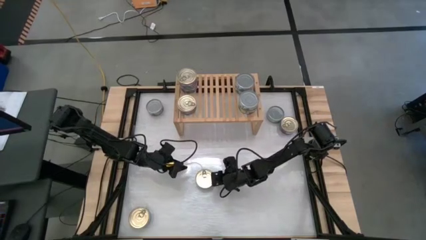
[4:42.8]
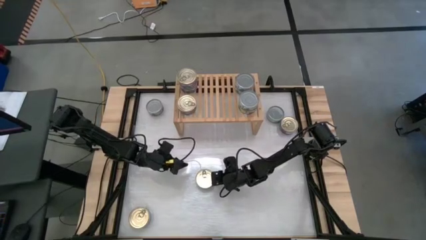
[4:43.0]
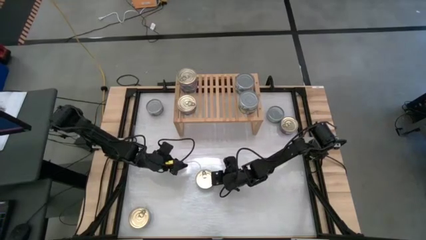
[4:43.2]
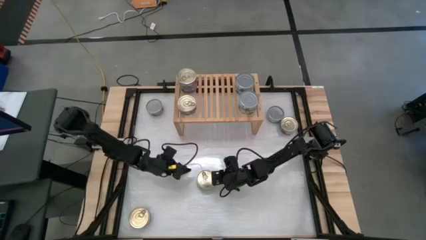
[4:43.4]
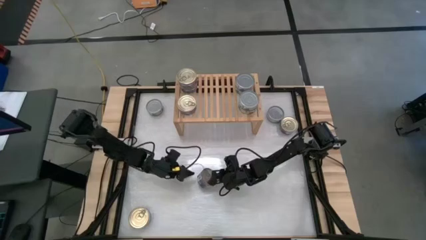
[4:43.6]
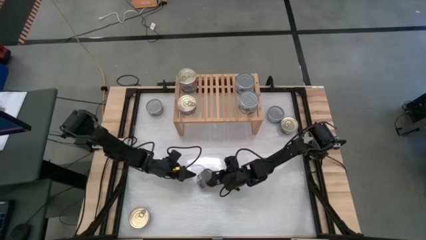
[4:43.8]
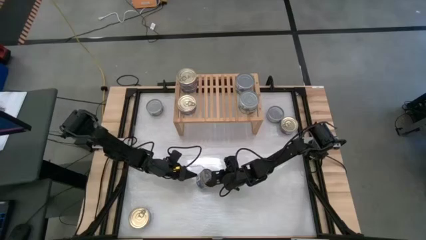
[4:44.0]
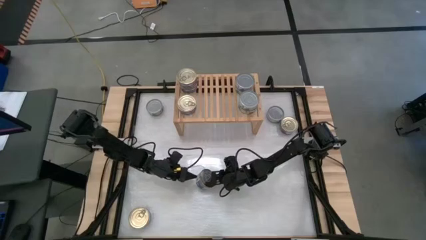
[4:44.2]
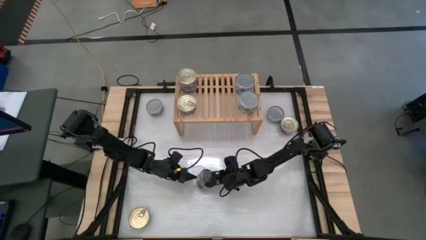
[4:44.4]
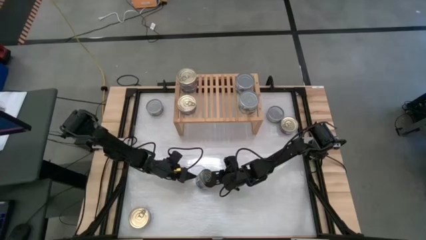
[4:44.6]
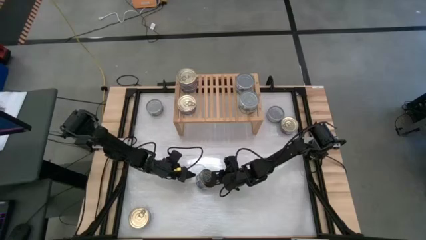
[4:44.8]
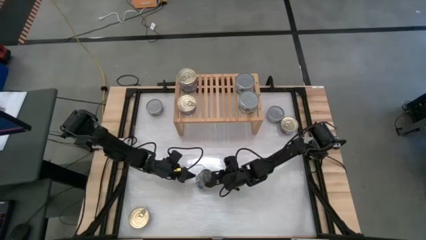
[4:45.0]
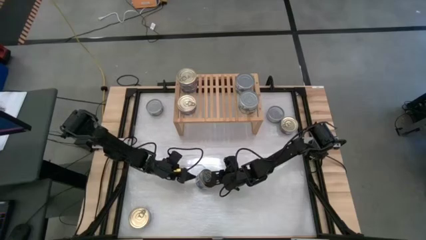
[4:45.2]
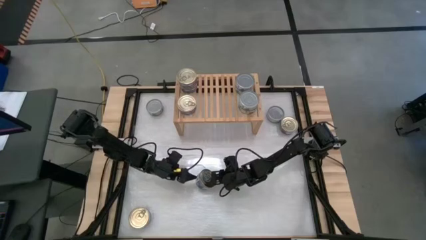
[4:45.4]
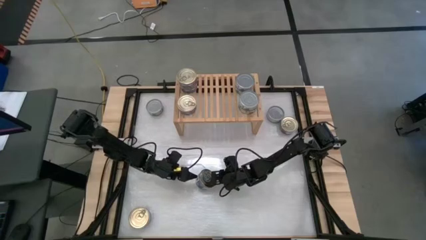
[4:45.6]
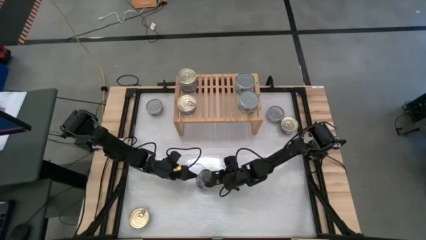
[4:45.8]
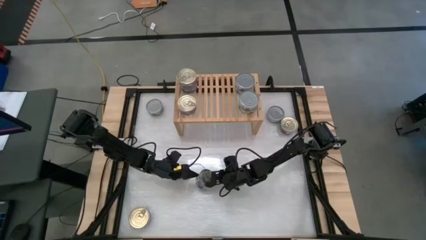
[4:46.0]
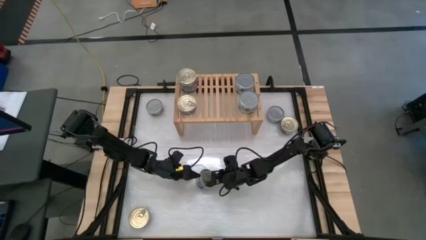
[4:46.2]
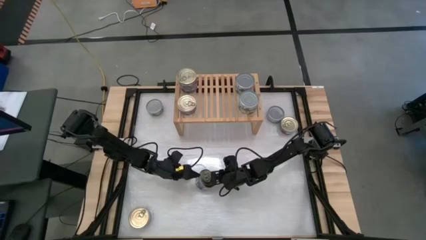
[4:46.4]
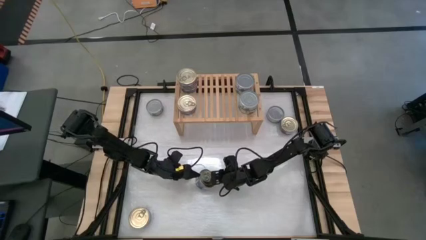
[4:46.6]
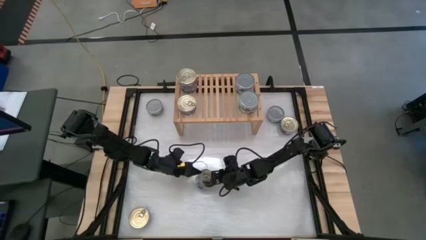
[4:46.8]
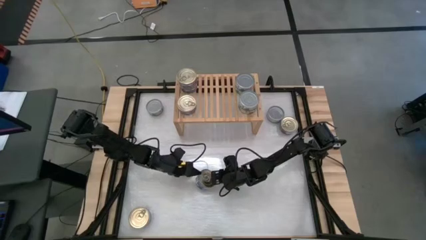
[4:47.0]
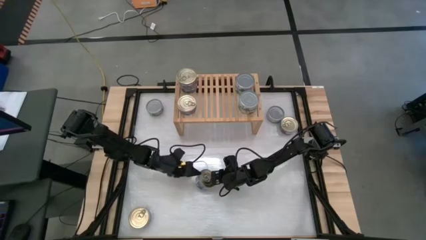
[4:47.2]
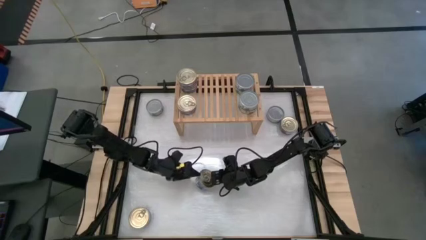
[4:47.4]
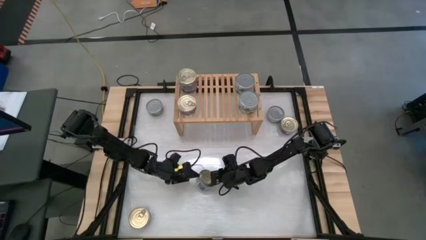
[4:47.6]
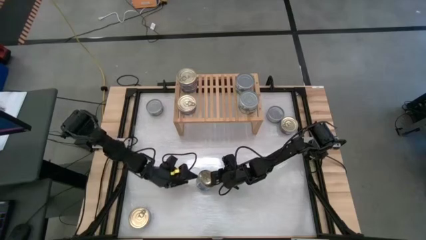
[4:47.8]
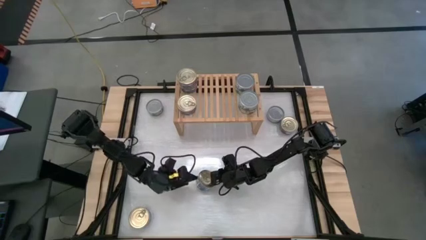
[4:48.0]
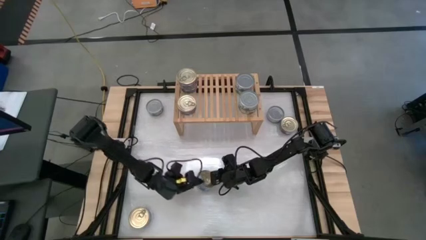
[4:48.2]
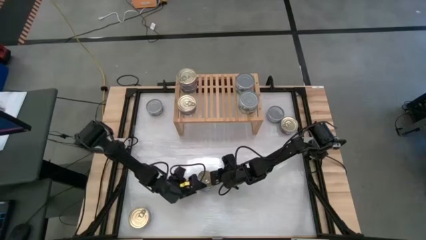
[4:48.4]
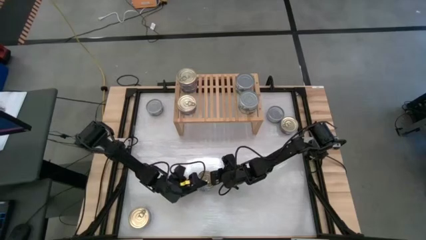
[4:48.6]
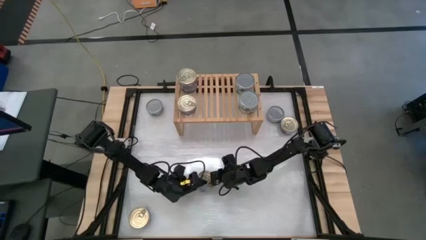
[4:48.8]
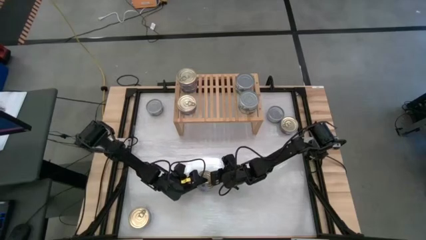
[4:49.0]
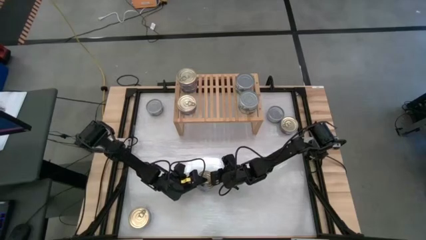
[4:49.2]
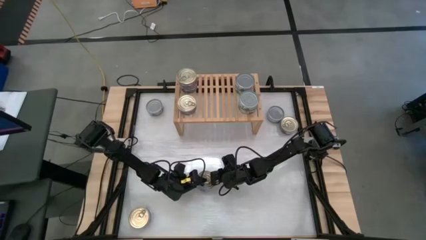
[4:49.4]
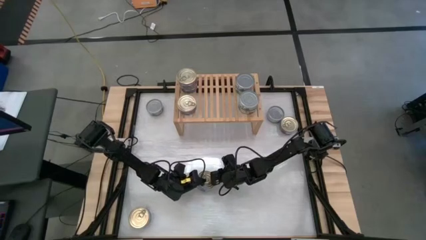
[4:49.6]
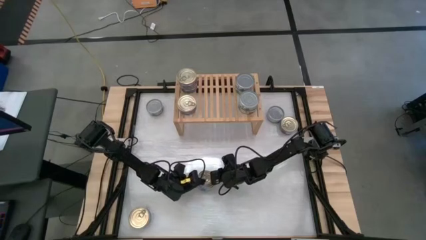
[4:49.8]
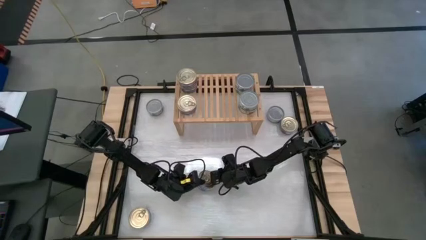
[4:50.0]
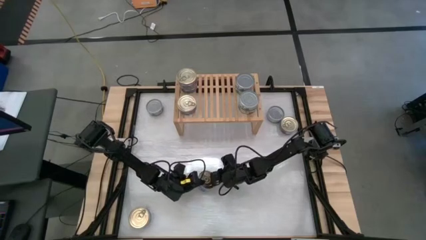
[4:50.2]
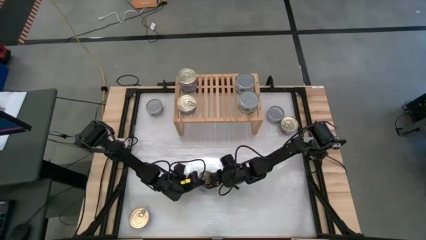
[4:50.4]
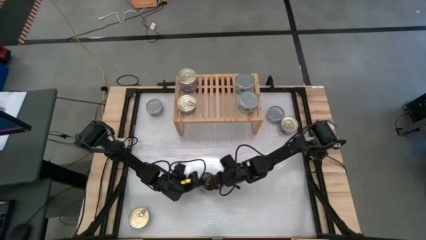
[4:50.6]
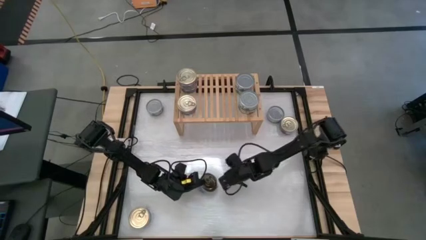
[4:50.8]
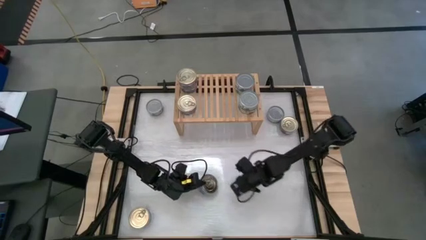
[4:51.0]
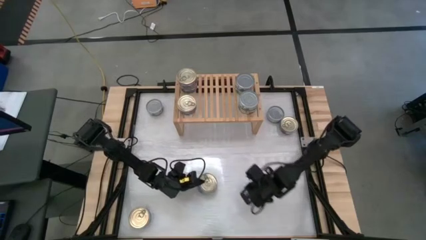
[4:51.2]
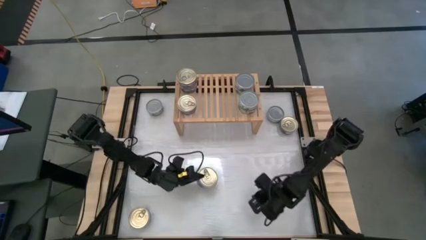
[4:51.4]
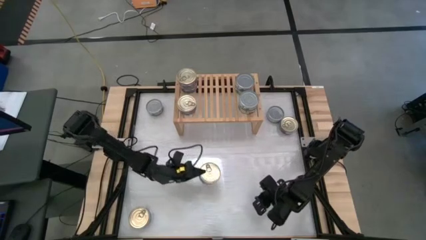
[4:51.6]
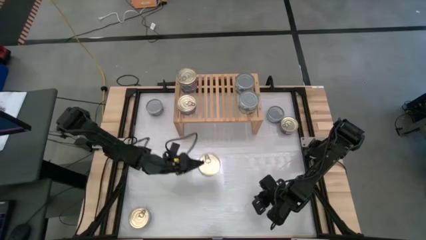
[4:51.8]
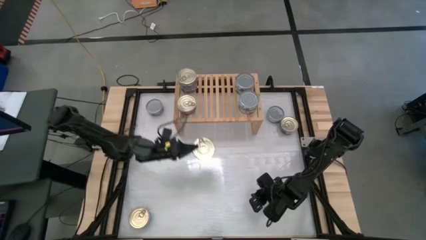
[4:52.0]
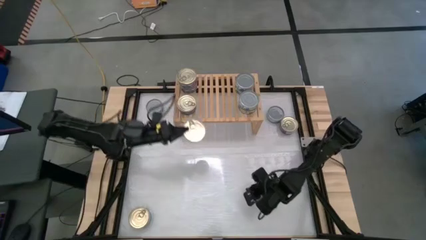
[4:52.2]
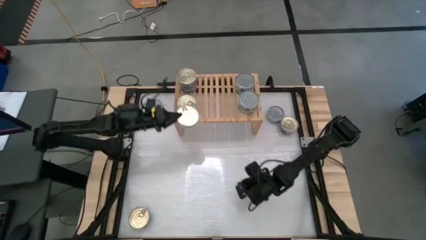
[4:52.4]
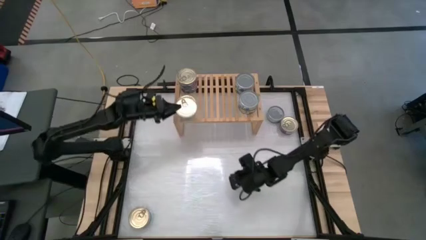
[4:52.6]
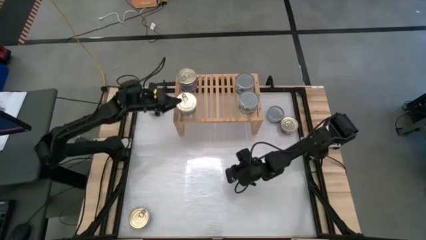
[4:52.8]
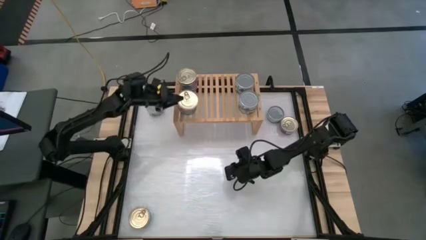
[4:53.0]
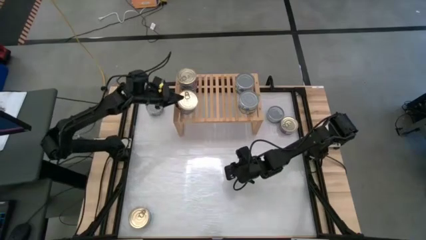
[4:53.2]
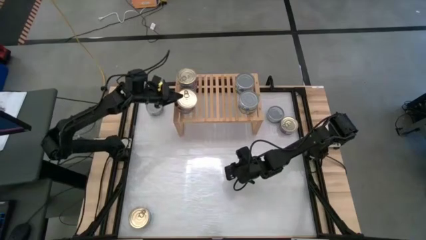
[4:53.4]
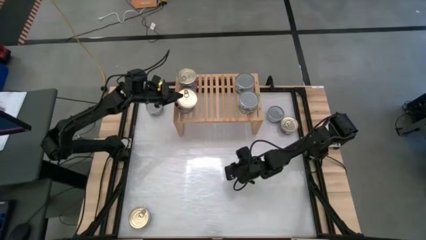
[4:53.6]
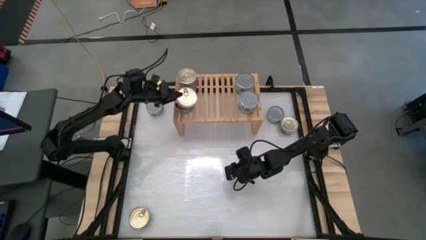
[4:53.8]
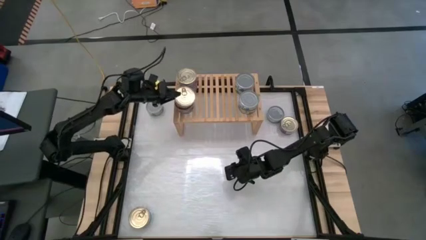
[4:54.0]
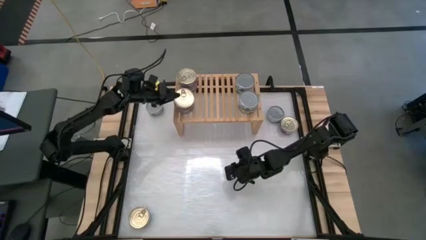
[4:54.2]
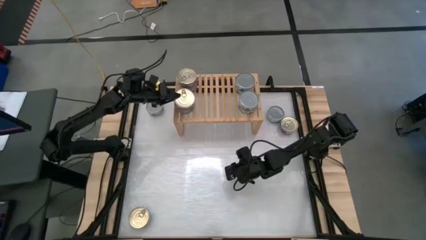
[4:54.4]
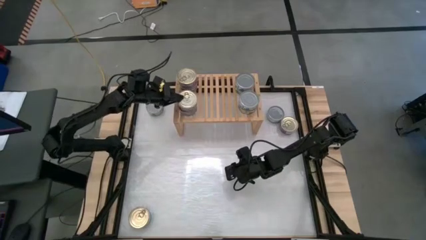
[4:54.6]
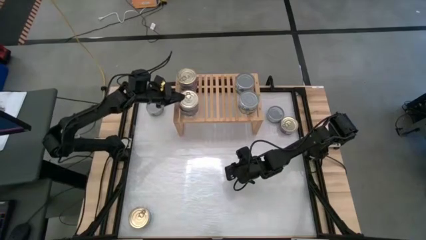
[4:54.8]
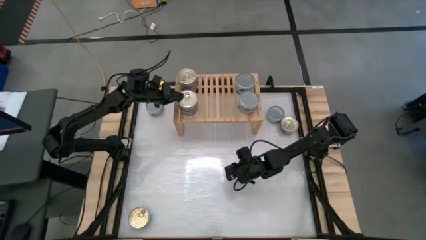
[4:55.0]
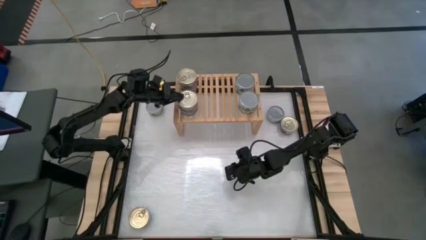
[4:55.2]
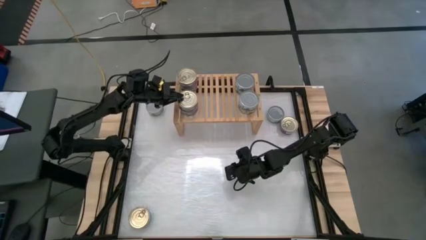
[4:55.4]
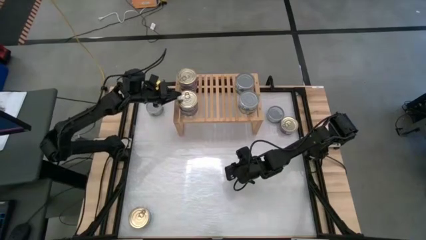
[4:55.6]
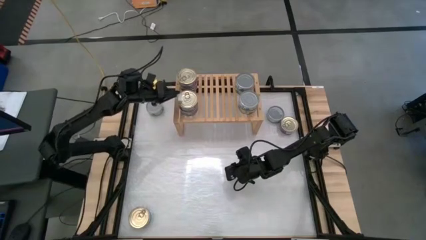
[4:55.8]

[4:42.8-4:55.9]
Task: Stack canned seafood by type on shelf
Stack the blue-pink tuna can on top of the other blue tuna-pink can on the shelf
